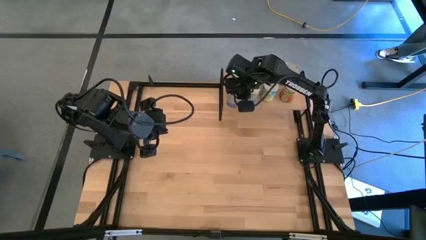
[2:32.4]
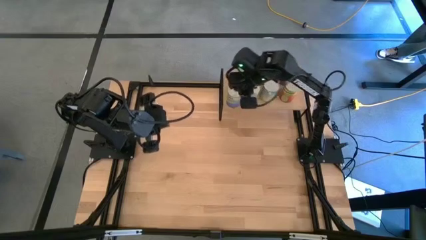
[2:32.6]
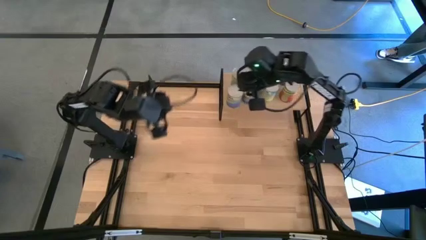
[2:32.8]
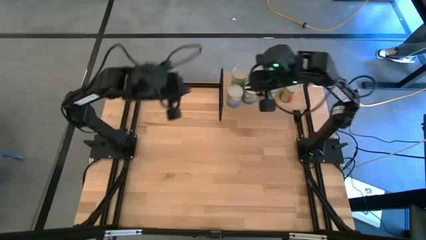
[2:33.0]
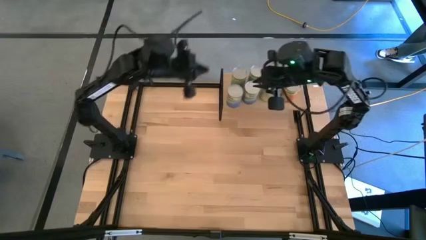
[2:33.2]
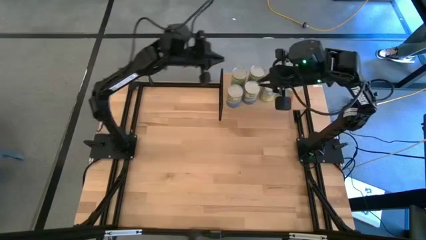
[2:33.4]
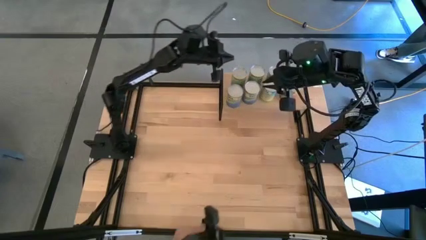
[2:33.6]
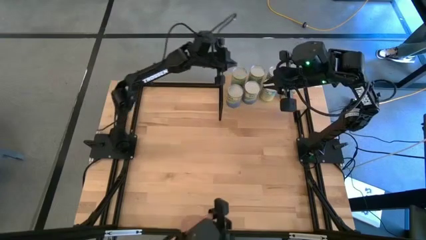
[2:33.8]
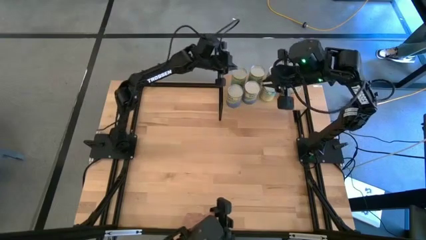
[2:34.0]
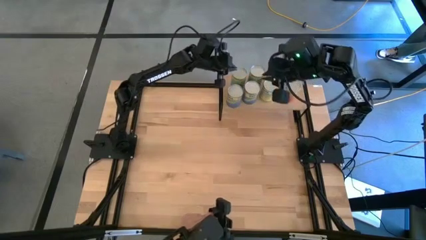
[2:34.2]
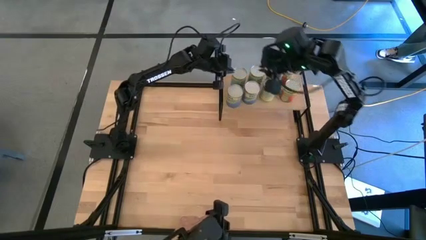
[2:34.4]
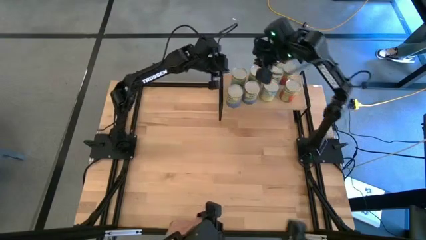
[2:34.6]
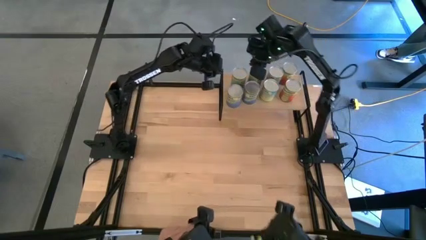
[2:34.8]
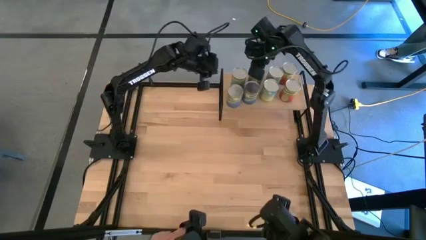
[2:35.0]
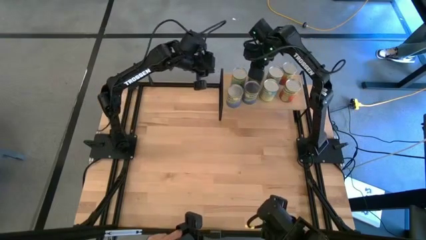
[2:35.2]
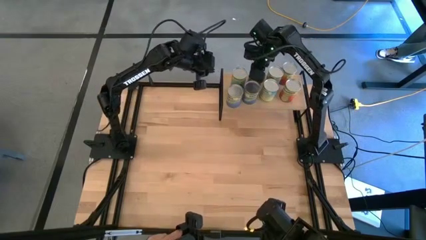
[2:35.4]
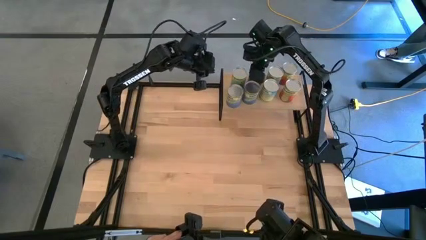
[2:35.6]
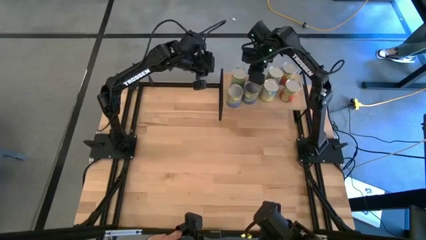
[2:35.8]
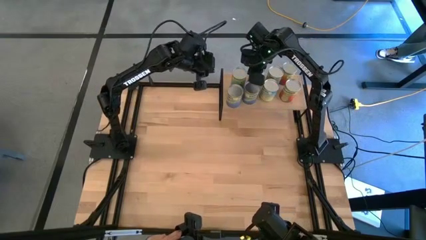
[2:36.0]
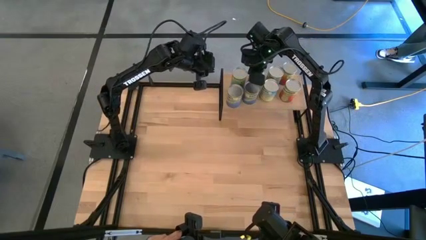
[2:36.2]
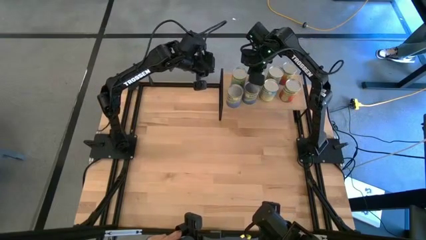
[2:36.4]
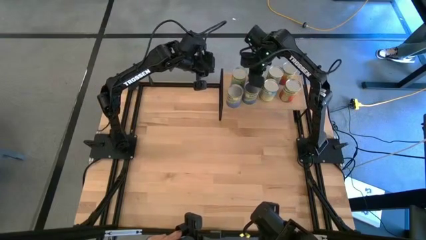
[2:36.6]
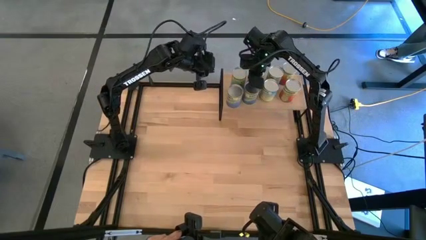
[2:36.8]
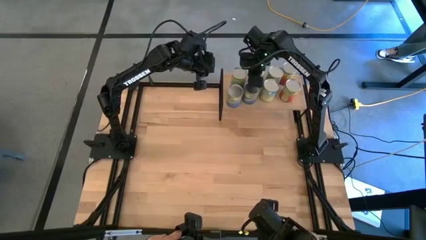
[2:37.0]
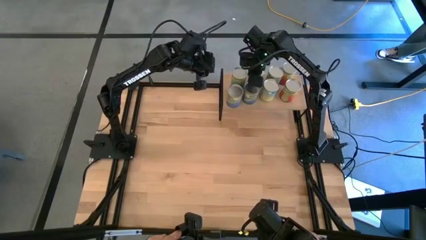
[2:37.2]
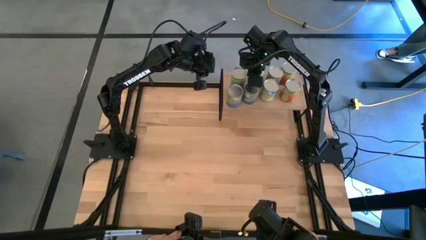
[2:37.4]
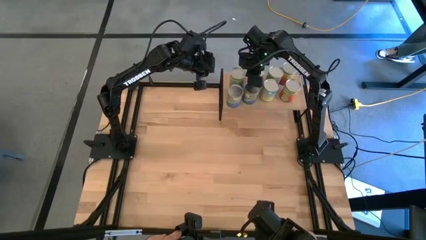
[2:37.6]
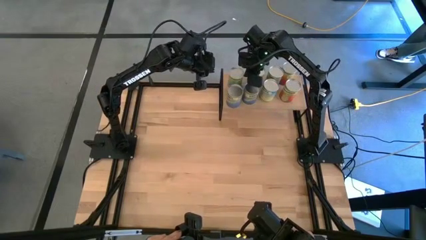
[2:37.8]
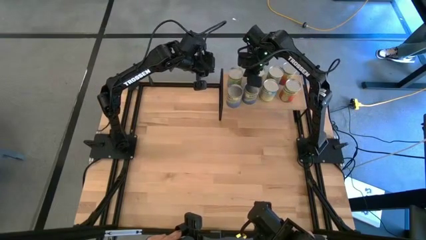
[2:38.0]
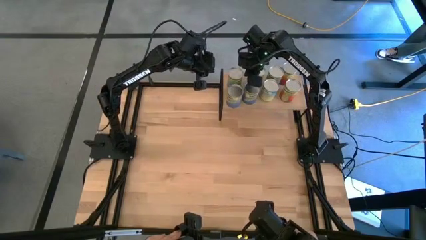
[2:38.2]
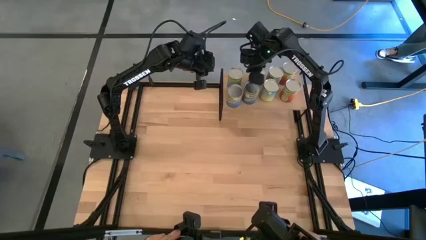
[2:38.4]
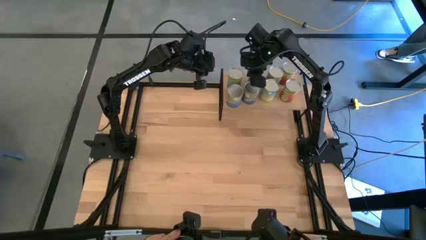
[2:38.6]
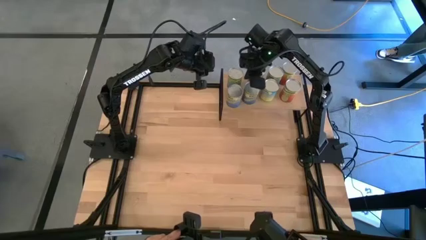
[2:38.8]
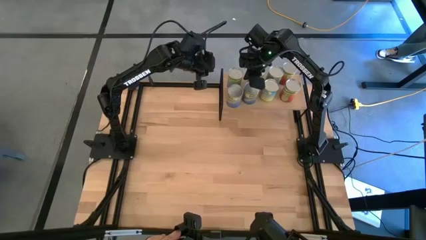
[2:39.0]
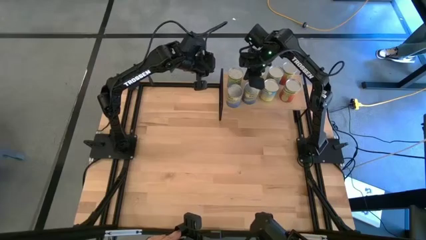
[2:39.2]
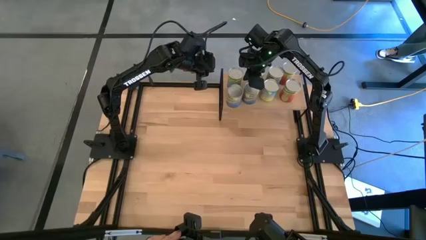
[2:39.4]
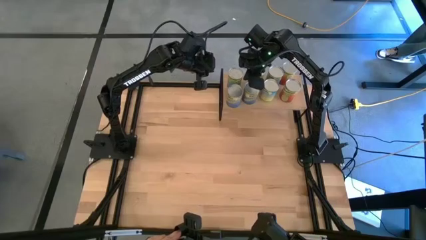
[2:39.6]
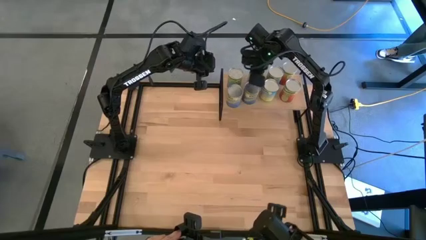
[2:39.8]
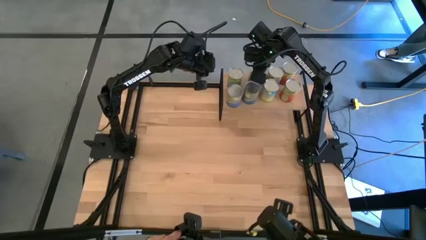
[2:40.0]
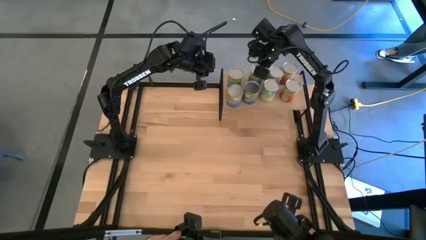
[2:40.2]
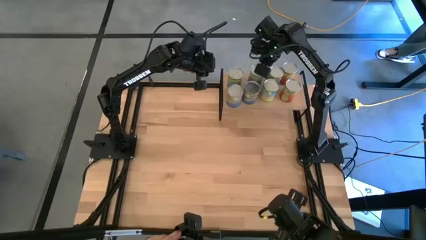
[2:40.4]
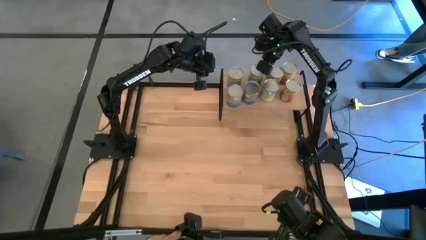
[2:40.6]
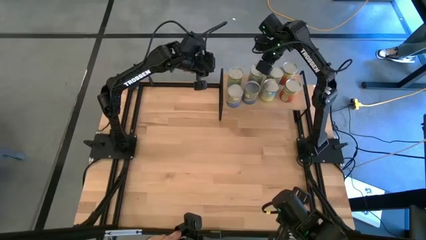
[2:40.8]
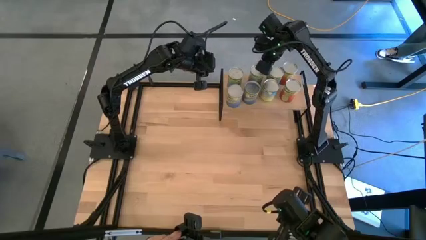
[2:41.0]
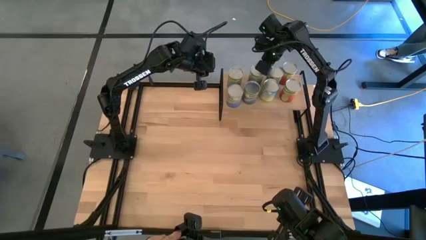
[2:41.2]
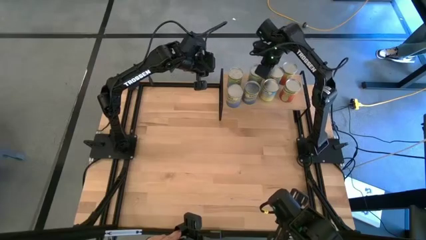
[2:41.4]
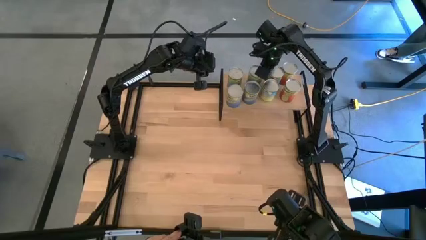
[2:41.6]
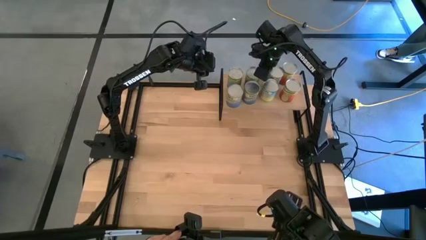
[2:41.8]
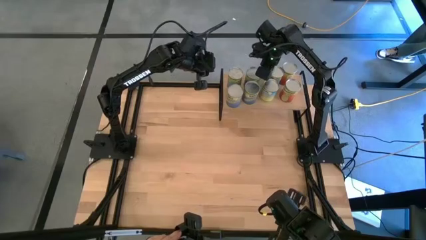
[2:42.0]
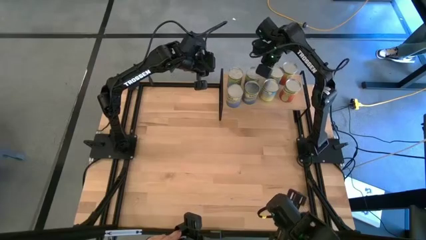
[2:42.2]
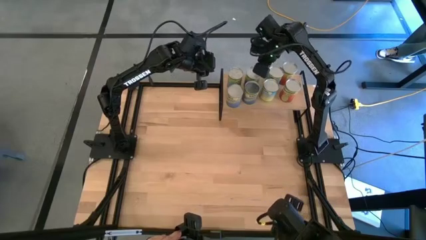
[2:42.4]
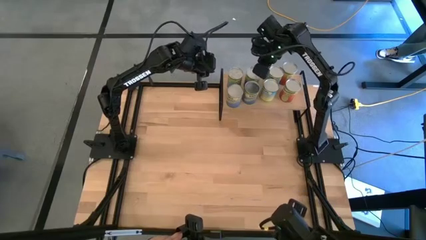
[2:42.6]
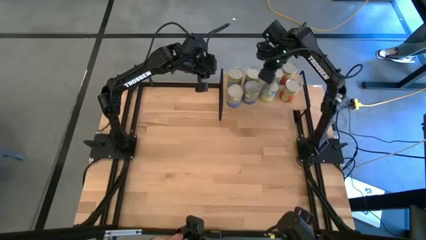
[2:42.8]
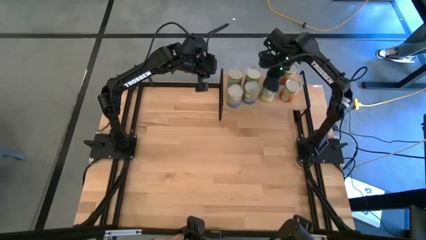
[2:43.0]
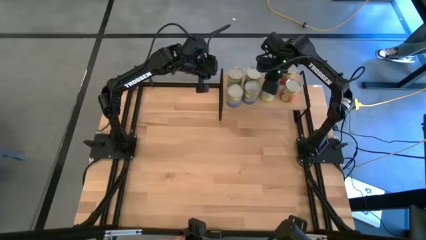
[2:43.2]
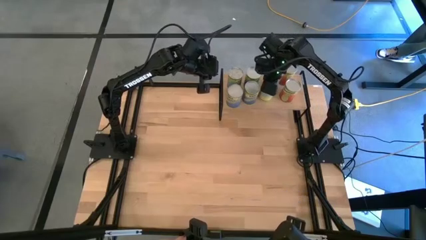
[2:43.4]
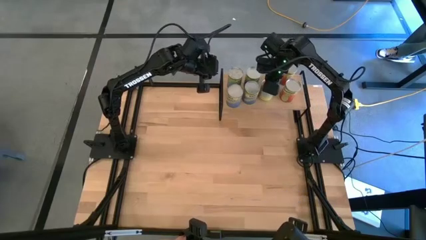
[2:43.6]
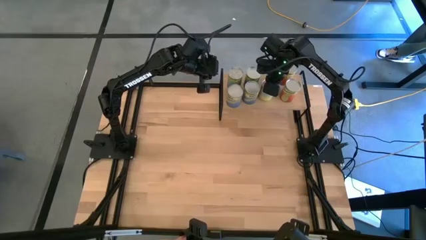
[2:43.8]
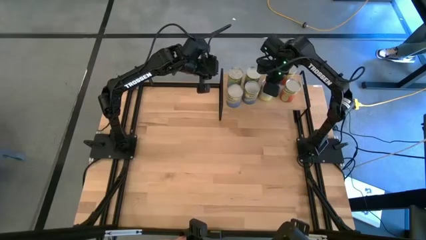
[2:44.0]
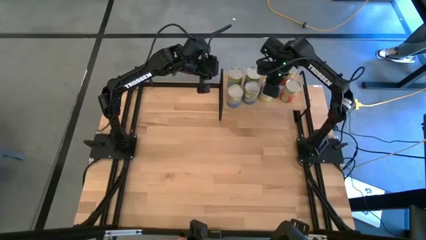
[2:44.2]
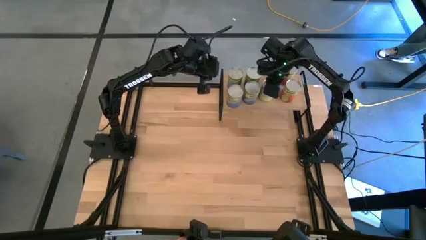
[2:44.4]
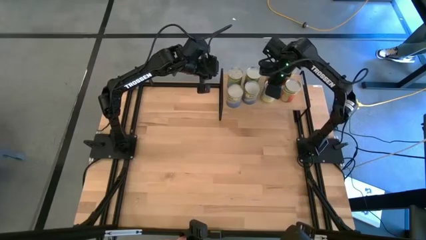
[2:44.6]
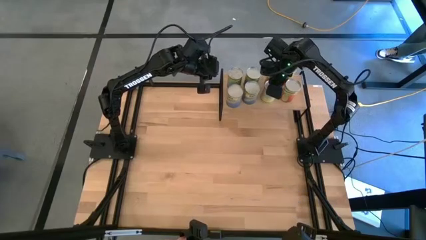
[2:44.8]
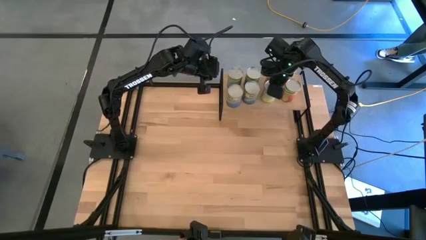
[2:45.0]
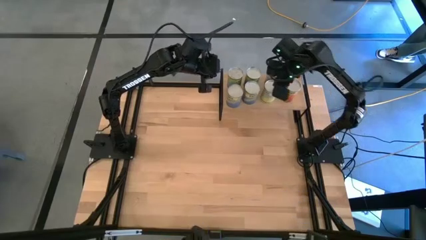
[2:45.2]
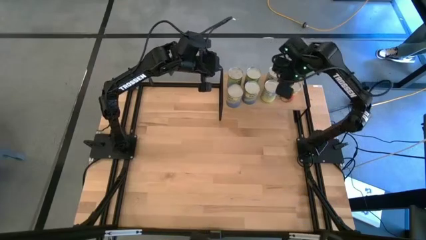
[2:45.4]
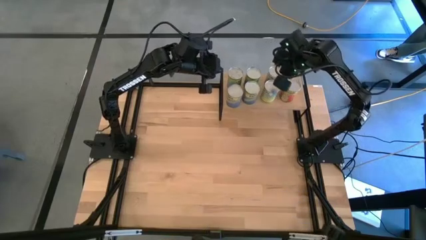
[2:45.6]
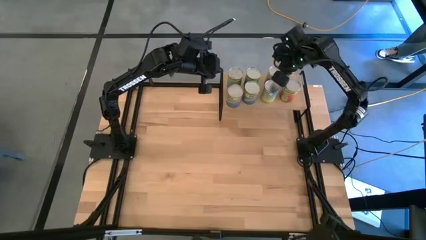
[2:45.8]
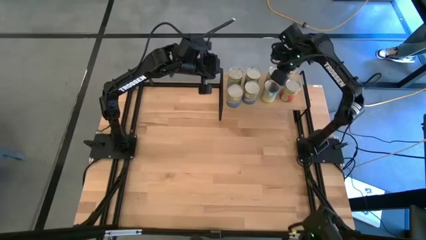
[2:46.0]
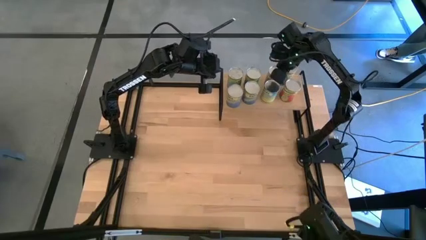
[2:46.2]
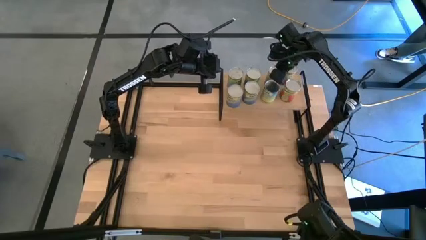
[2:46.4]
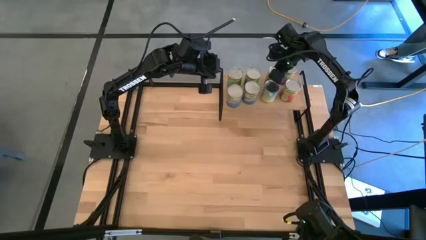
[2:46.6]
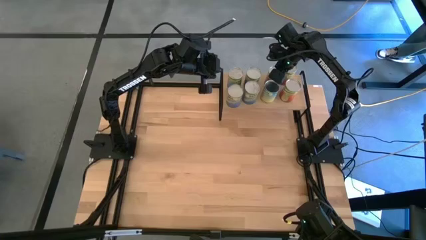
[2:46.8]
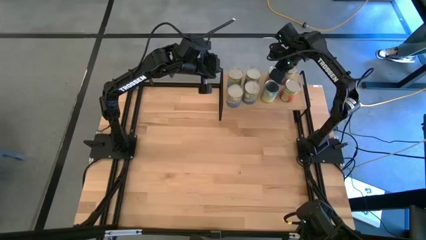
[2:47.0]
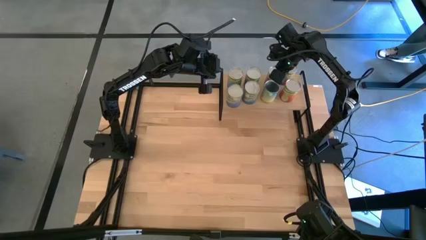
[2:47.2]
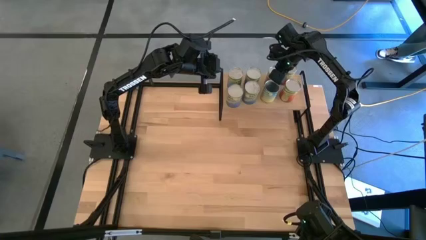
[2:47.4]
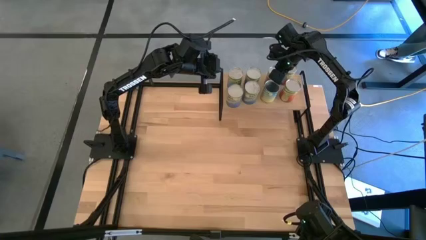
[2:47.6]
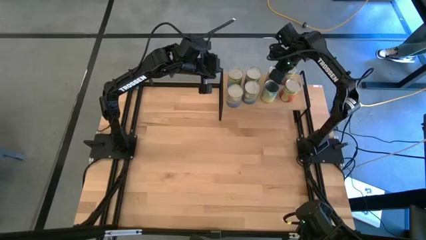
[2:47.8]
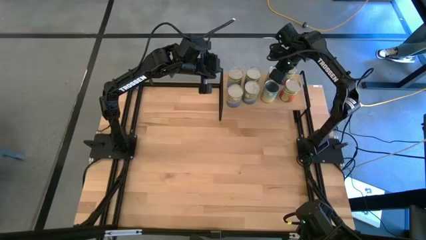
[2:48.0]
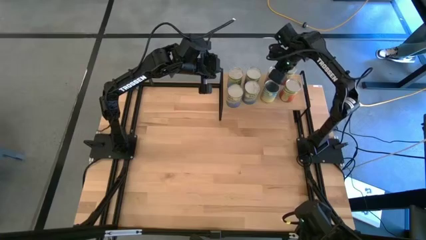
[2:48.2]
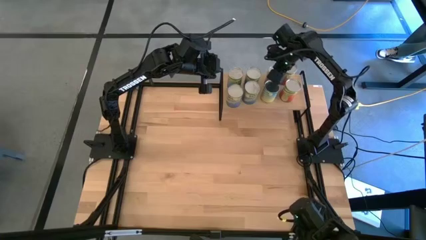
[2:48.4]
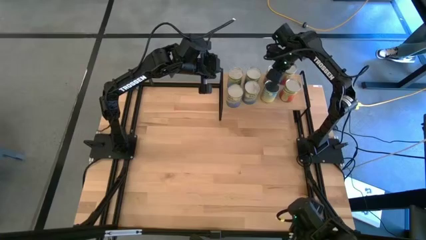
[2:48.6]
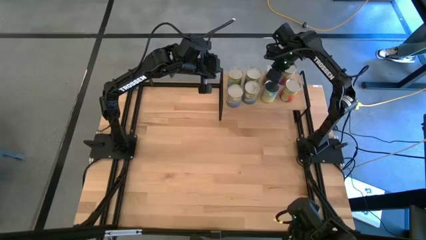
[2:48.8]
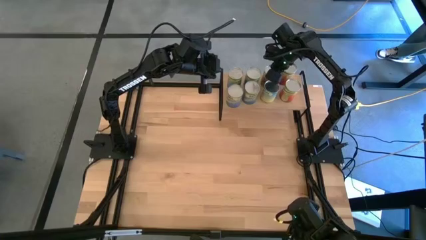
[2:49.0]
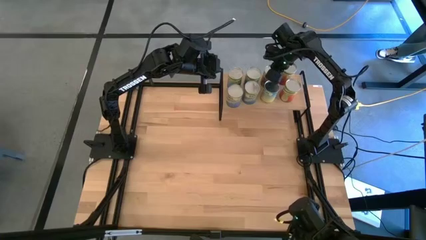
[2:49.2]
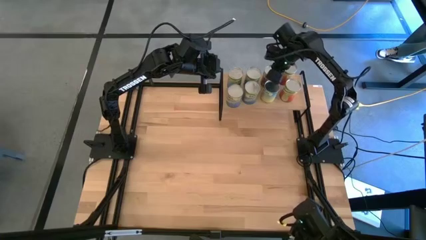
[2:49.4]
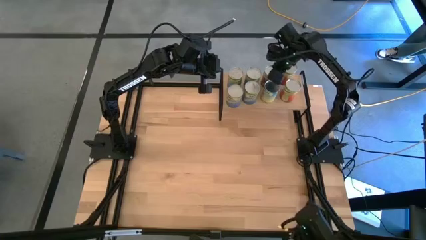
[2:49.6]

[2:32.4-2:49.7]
Task: Pick and place cans onto a shelf
Adjust the canned goods on the shelf
